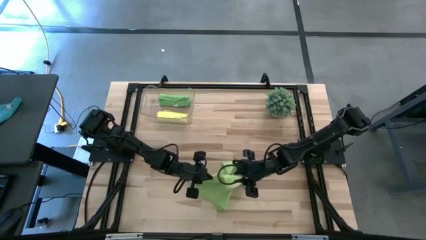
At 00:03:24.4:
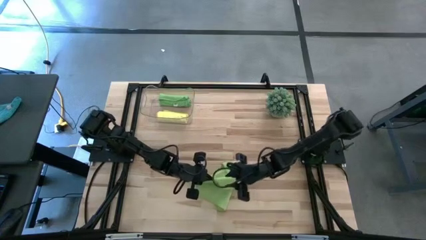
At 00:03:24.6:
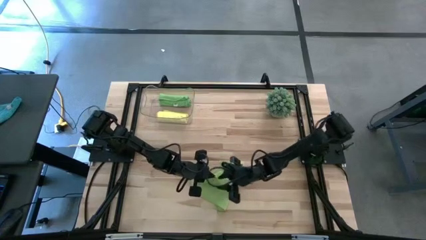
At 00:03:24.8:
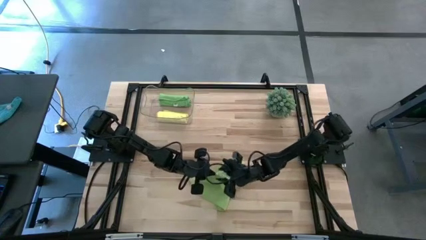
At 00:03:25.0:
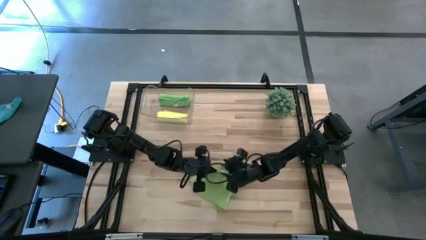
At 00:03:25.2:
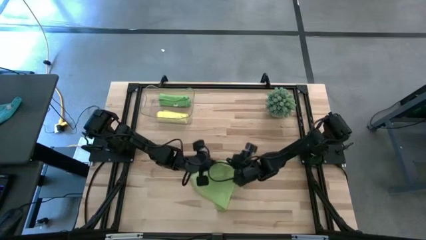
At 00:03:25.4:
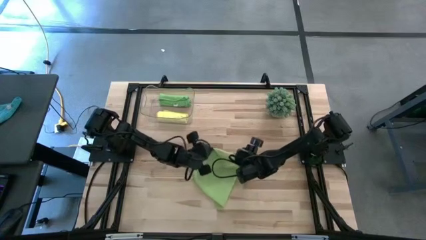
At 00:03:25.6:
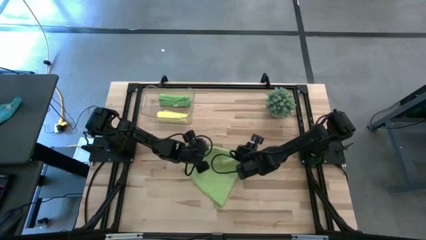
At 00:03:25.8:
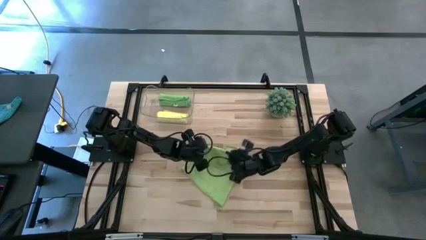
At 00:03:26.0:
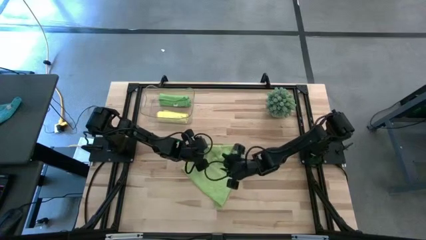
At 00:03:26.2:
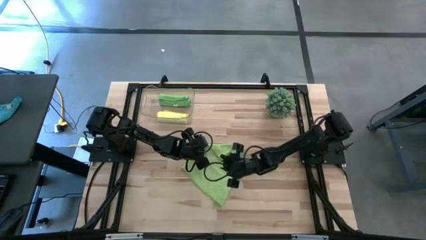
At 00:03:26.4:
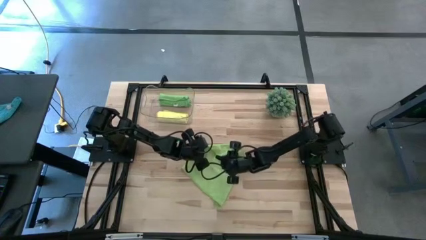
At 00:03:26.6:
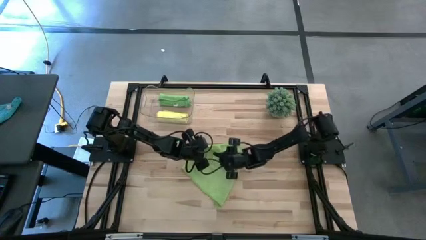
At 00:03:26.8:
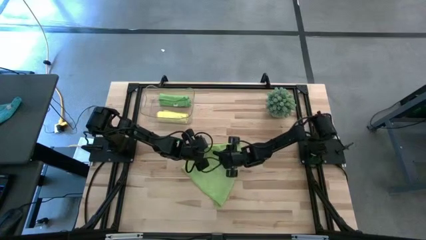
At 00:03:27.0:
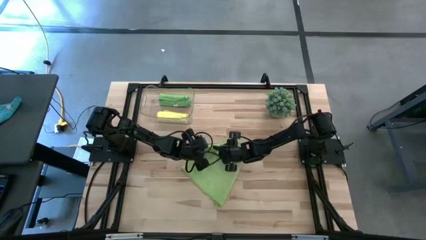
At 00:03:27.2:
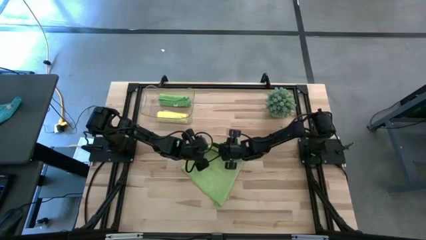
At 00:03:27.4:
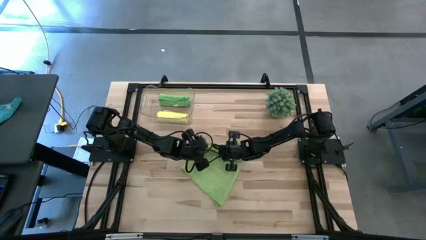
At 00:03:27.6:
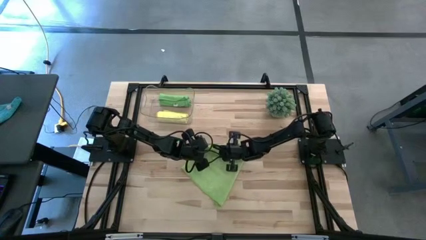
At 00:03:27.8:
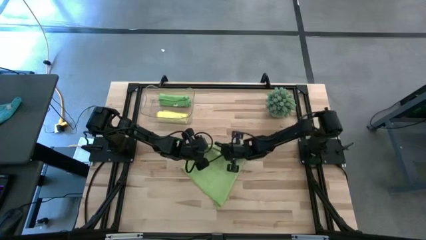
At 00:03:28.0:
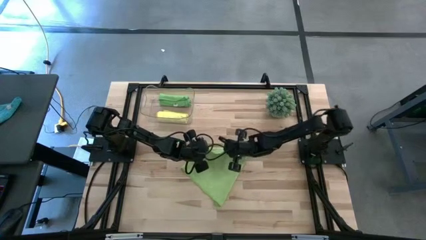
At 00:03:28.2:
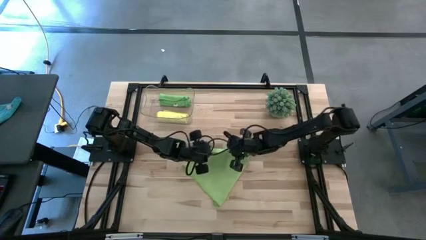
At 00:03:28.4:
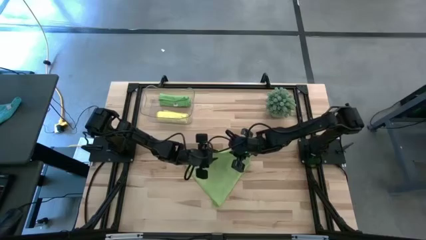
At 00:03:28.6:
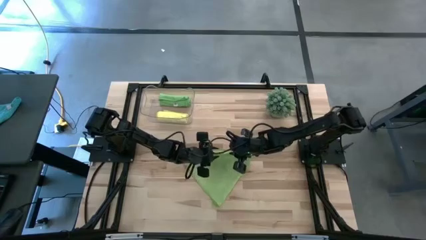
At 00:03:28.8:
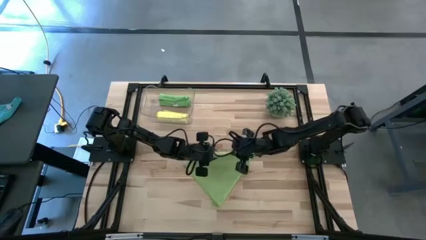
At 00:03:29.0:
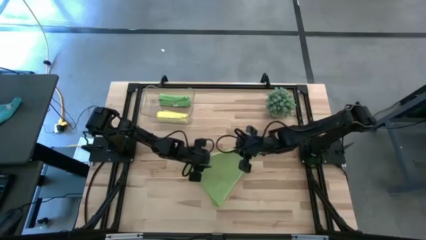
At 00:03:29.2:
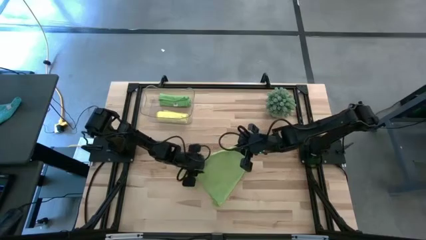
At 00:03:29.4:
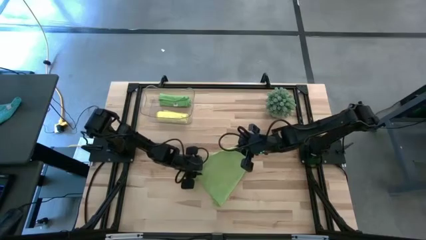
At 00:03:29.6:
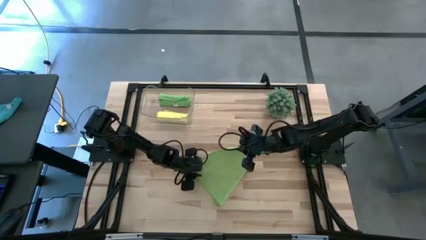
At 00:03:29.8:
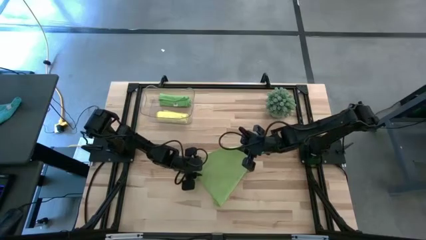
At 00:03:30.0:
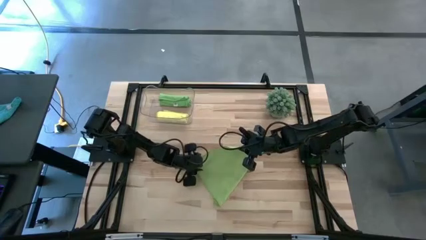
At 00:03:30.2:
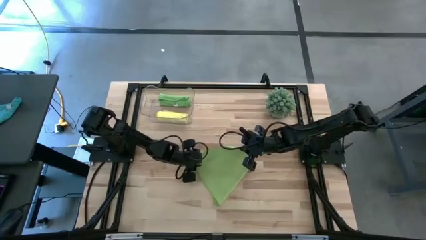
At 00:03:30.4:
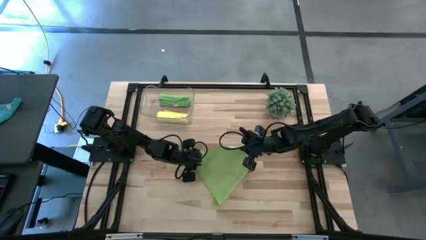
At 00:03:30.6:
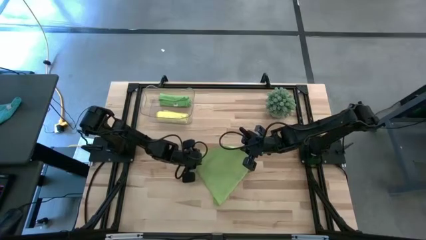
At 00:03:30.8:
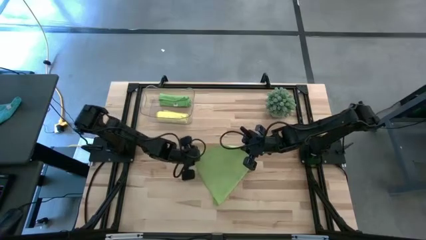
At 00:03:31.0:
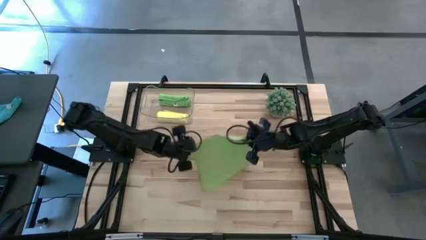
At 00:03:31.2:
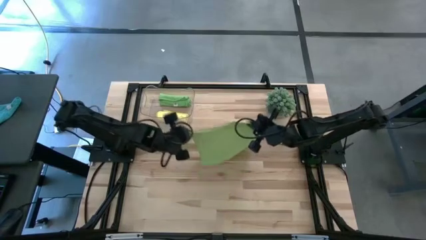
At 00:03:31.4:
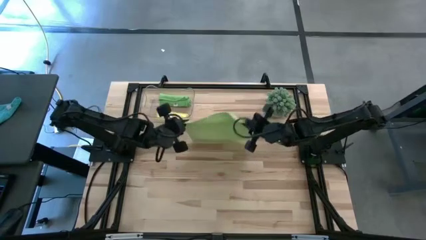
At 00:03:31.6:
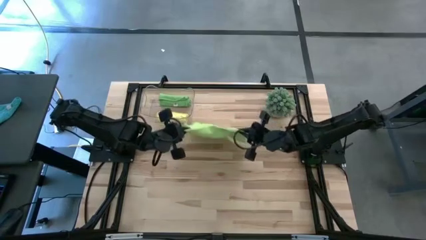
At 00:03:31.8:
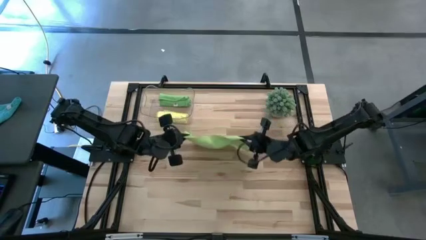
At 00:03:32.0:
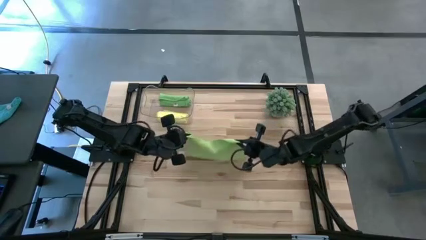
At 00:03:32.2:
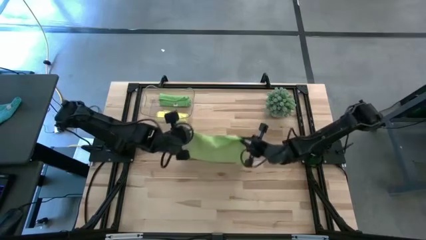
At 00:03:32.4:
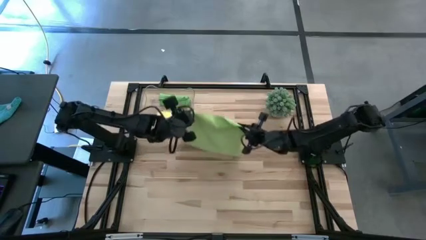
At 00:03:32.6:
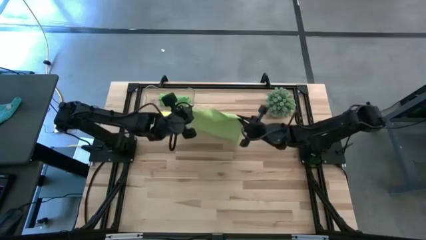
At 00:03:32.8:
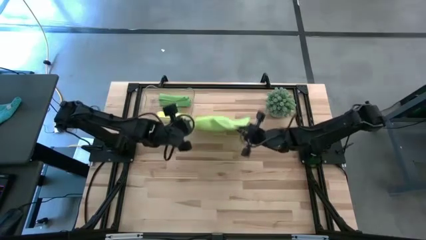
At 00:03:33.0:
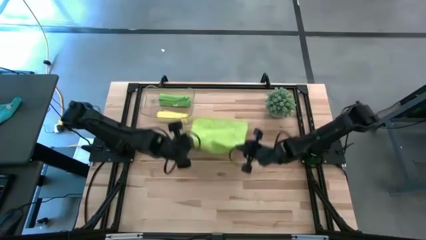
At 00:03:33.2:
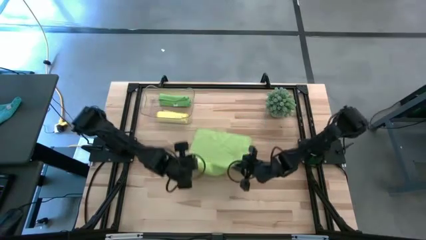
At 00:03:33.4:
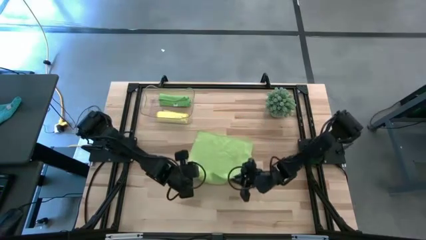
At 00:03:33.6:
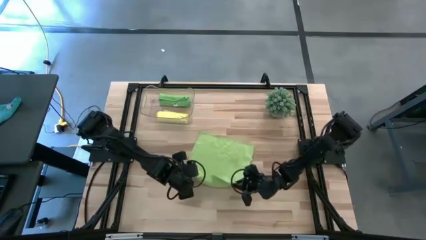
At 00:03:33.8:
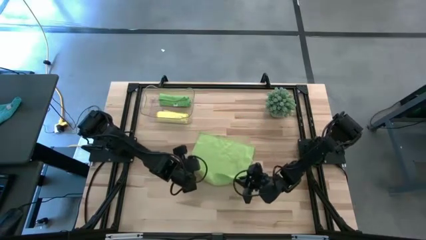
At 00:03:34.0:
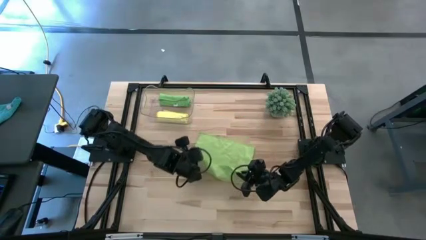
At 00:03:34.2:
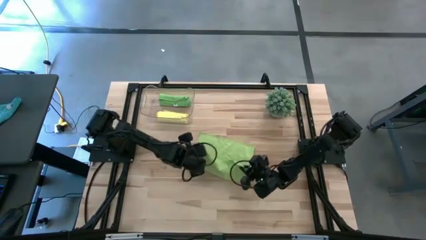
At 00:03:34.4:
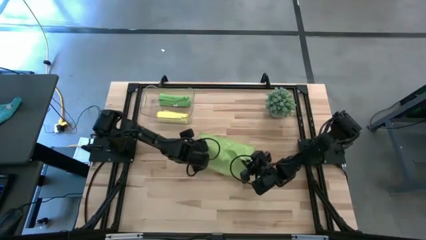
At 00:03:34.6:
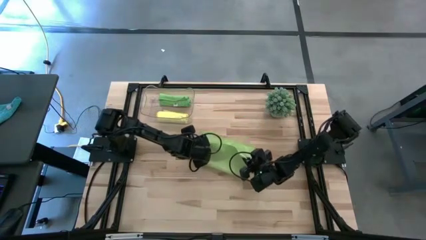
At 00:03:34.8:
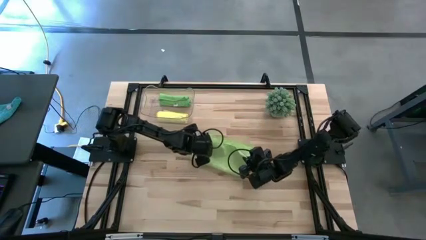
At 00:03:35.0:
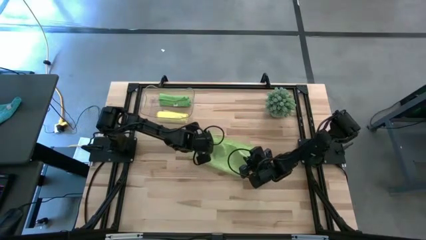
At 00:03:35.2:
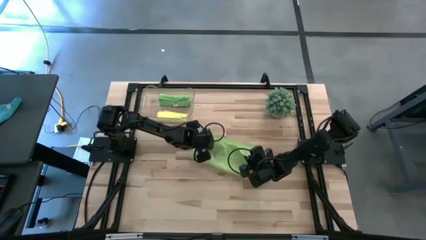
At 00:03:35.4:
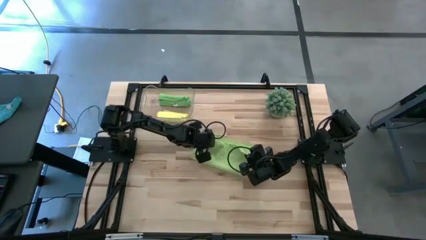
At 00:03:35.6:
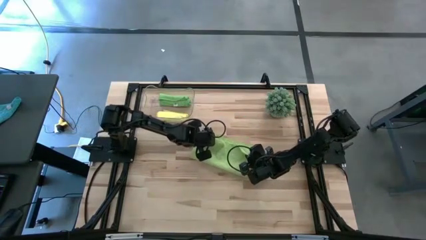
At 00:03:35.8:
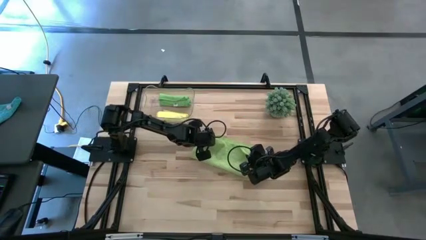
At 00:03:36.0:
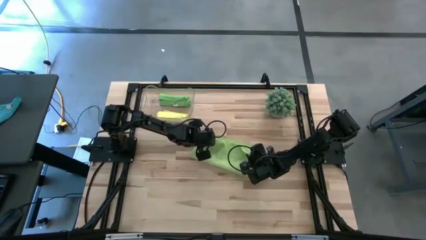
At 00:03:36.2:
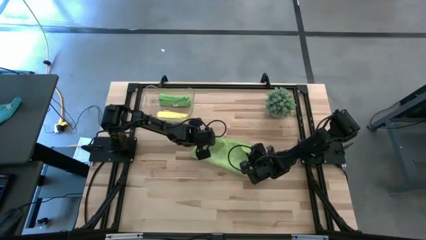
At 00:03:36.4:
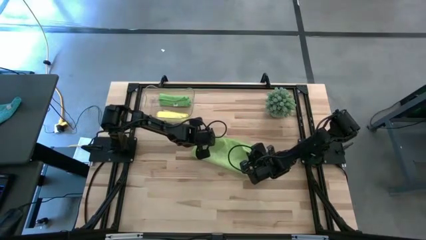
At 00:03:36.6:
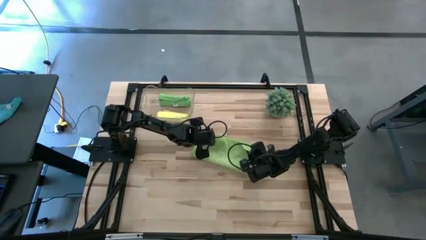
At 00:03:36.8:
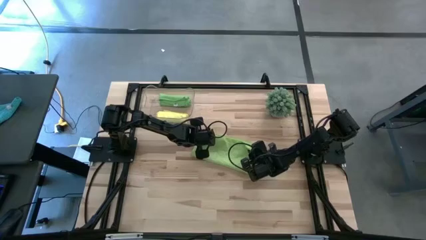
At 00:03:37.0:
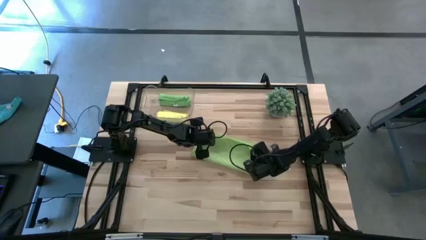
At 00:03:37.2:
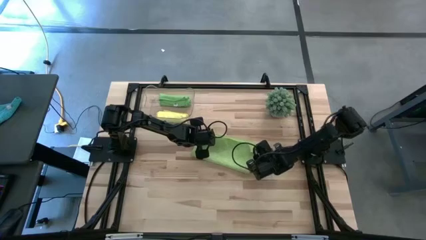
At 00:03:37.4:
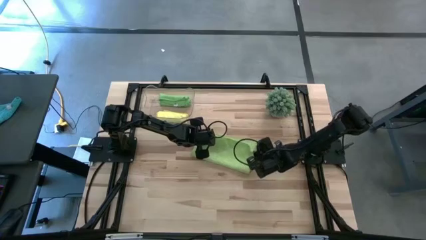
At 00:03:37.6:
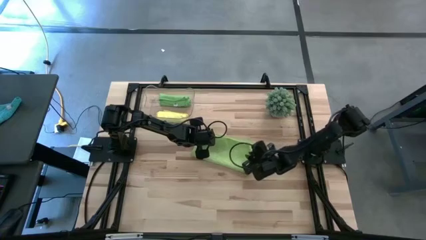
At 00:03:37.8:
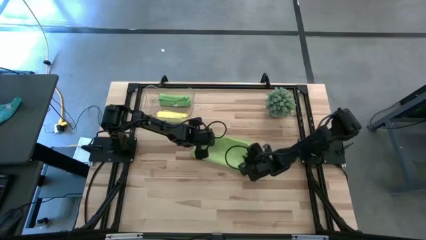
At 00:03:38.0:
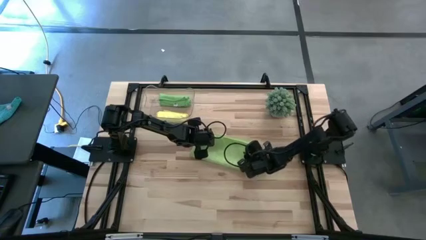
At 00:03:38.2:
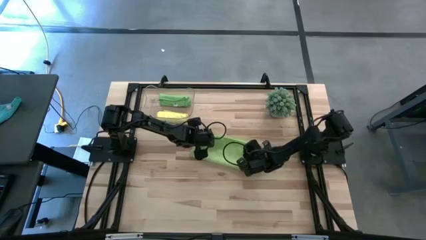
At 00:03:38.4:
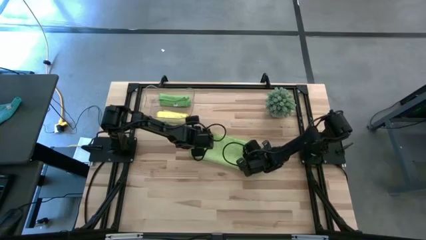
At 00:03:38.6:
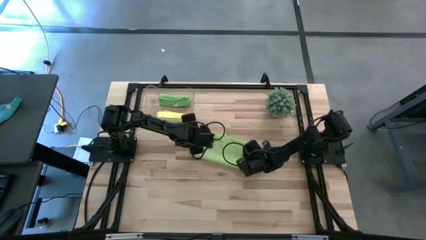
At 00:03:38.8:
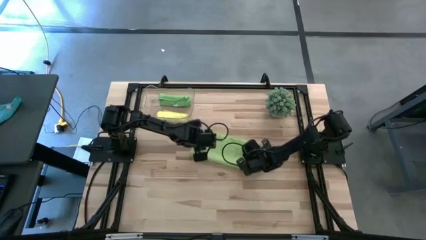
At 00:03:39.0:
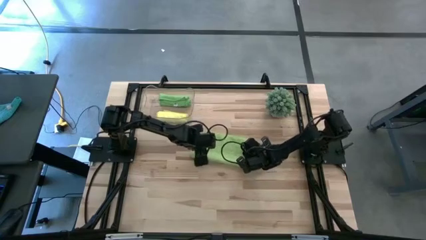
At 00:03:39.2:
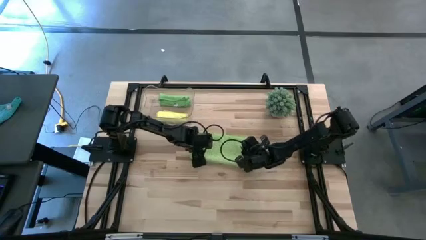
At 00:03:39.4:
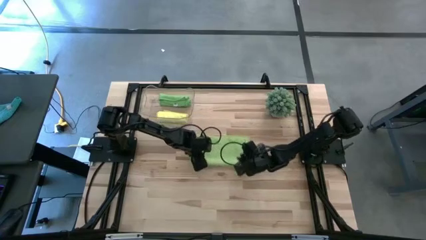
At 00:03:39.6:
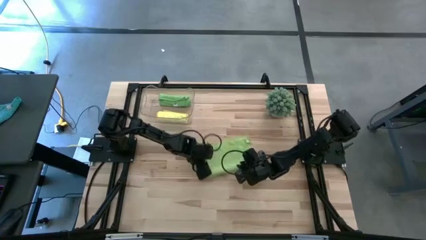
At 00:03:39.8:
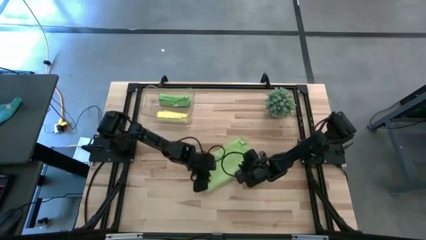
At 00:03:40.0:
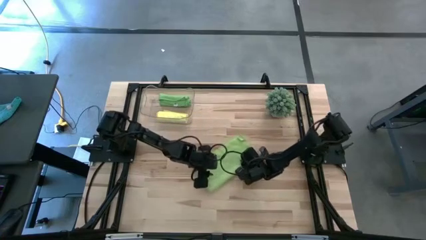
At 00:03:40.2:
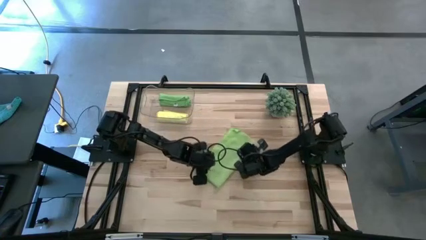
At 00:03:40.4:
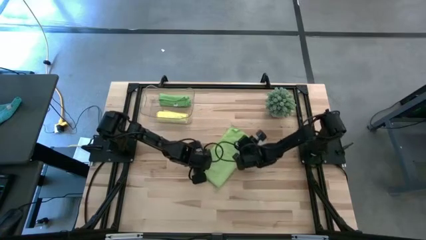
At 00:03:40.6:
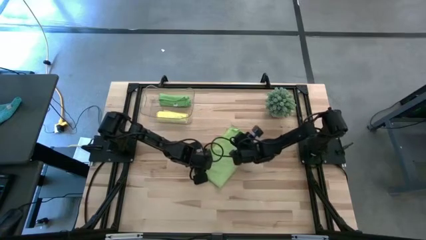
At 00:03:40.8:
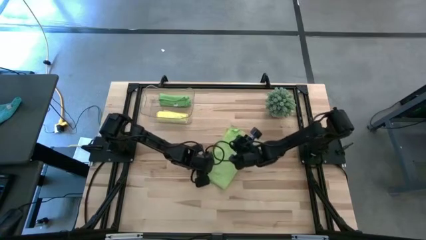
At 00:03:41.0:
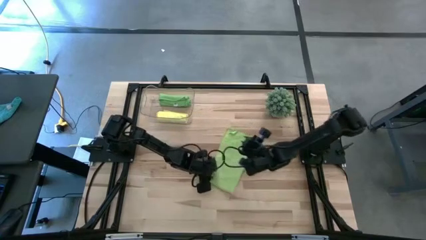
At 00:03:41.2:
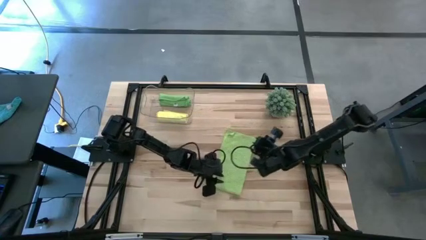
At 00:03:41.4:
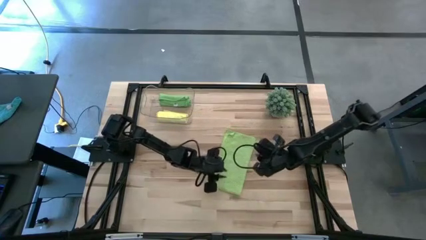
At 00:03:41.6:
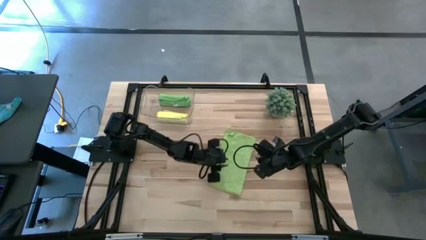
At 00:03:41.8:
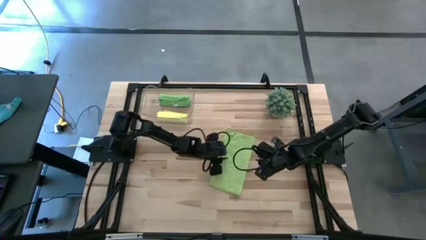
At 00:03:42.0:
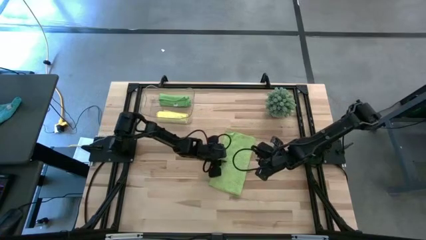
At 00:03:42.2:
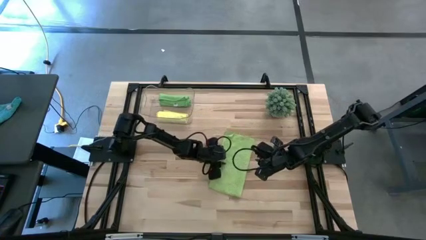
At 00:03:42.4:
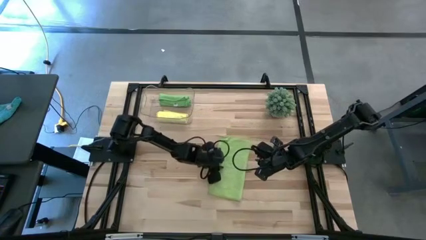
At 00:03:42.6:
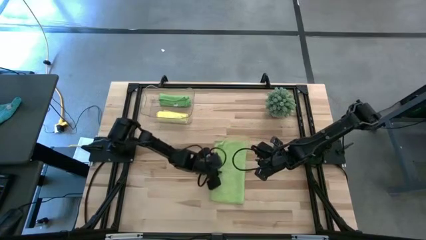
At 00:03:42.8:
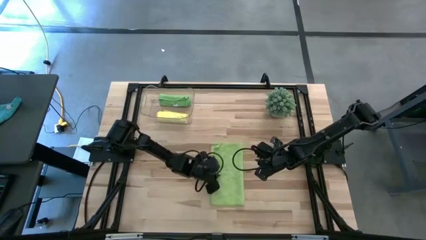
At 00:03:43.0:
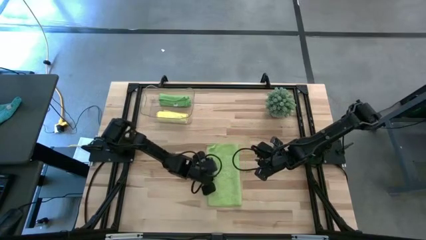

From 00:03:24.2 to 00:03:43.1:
Task: Roll microfiber towels into tight, uniform cylinder then place into a basket
Fold the light green microfiber cloth
